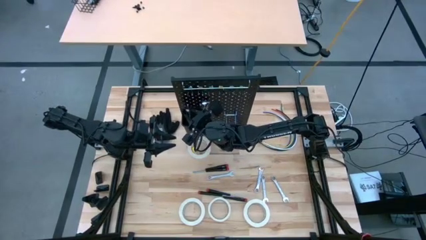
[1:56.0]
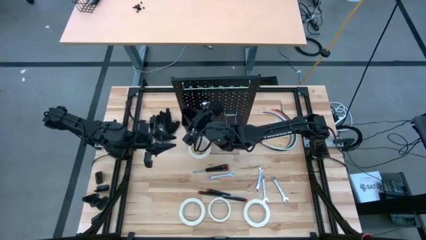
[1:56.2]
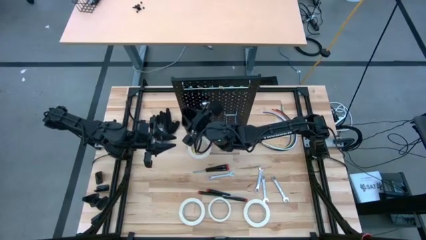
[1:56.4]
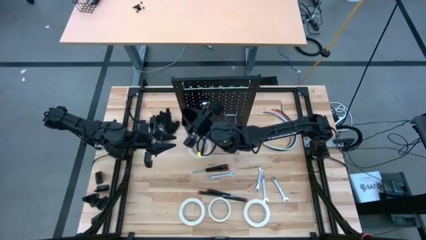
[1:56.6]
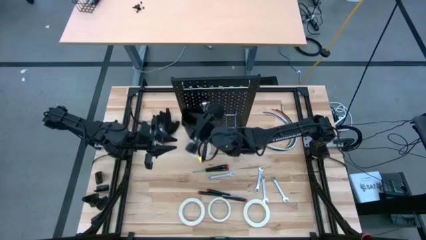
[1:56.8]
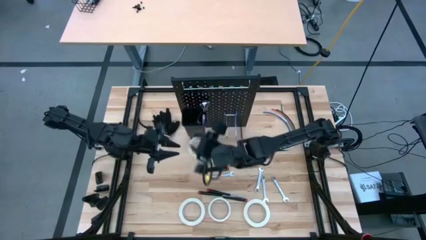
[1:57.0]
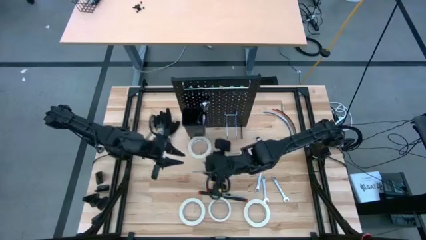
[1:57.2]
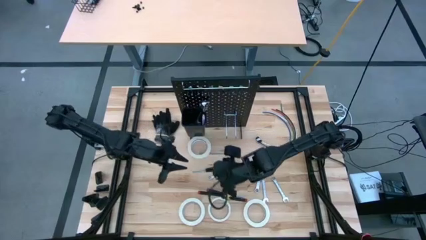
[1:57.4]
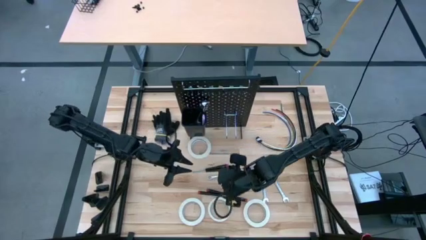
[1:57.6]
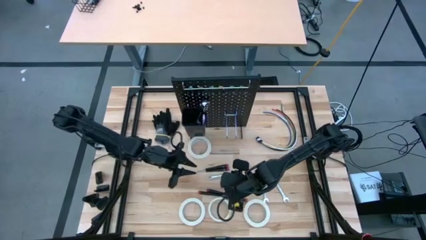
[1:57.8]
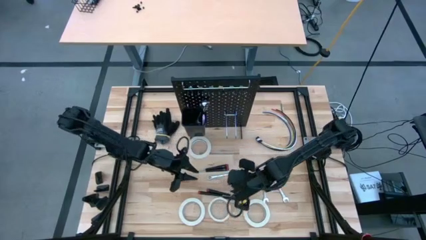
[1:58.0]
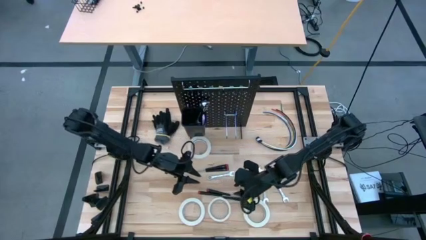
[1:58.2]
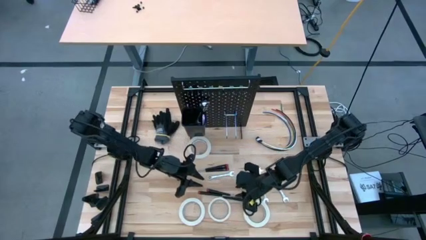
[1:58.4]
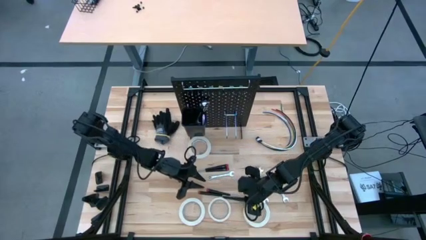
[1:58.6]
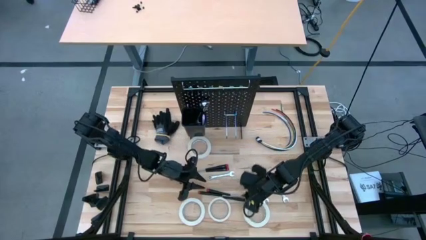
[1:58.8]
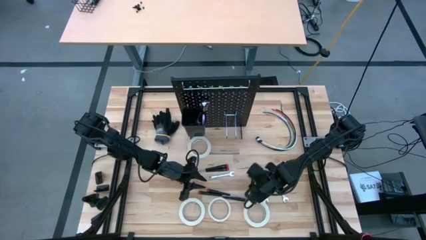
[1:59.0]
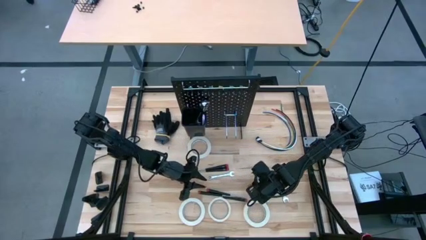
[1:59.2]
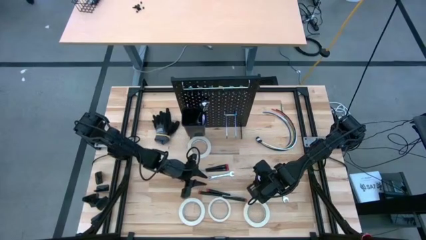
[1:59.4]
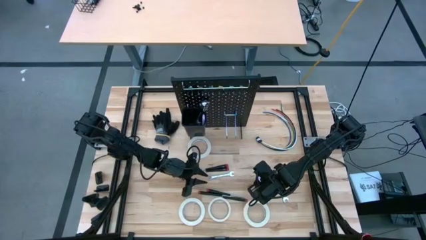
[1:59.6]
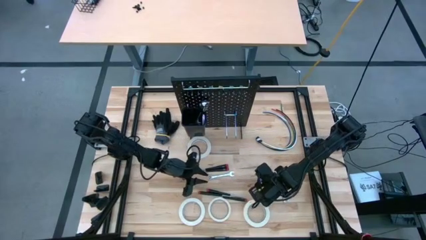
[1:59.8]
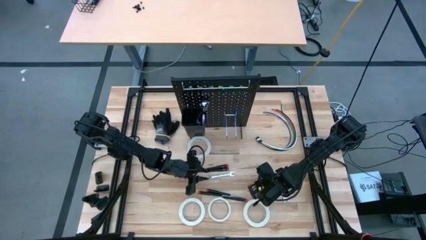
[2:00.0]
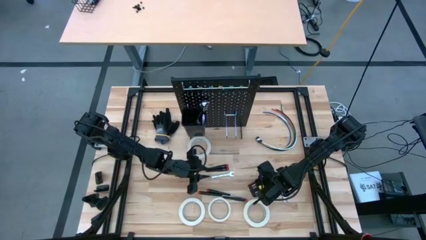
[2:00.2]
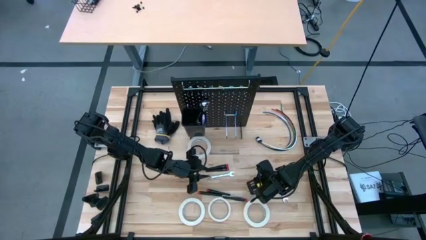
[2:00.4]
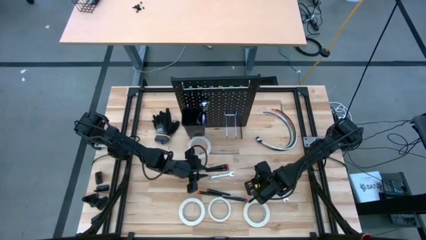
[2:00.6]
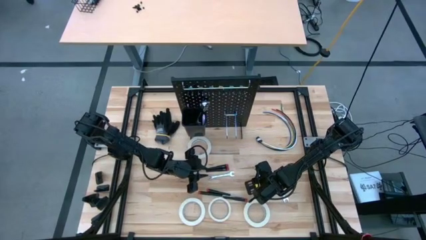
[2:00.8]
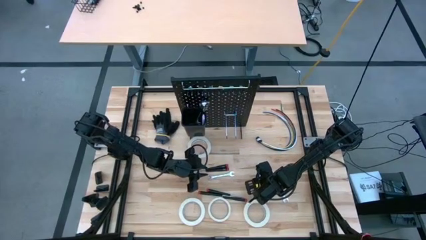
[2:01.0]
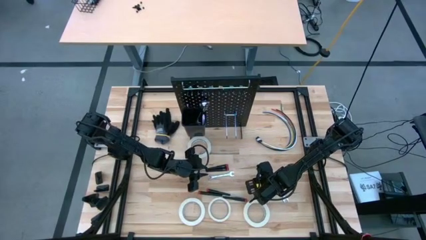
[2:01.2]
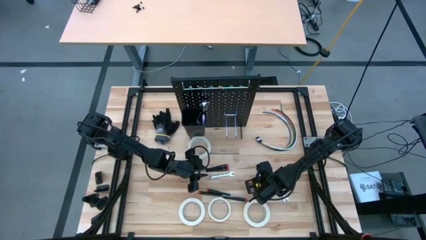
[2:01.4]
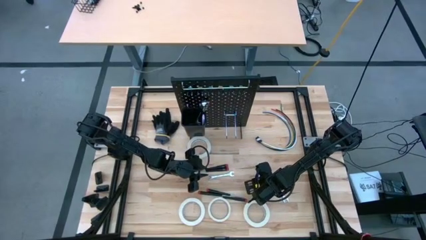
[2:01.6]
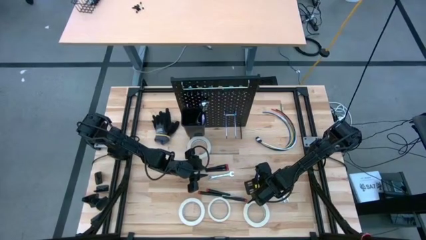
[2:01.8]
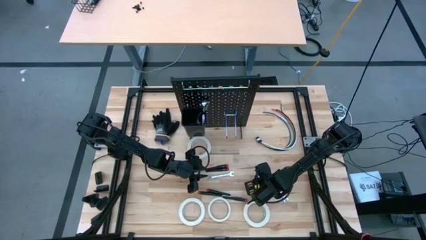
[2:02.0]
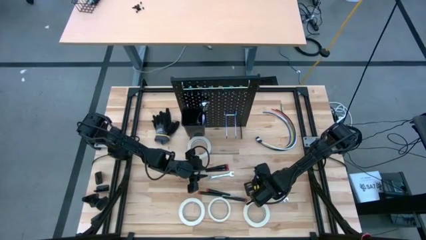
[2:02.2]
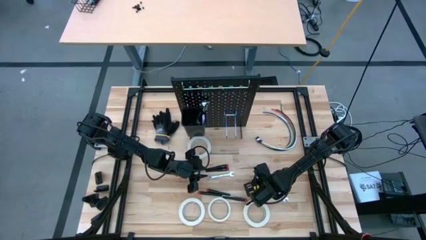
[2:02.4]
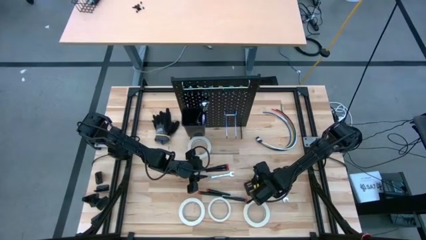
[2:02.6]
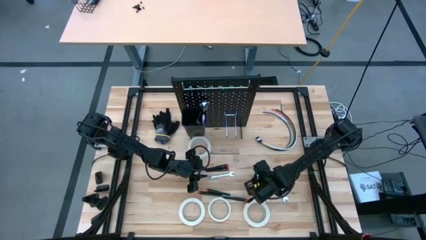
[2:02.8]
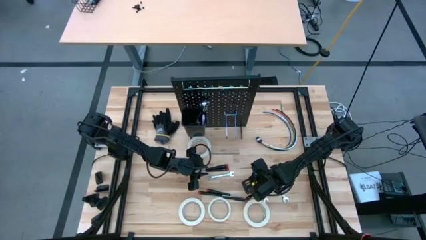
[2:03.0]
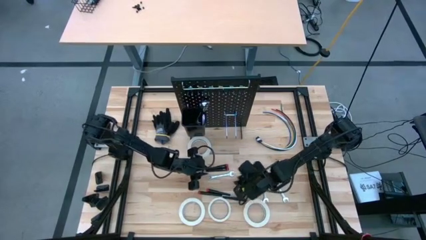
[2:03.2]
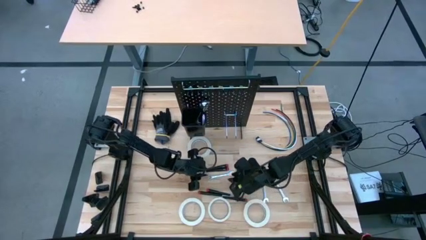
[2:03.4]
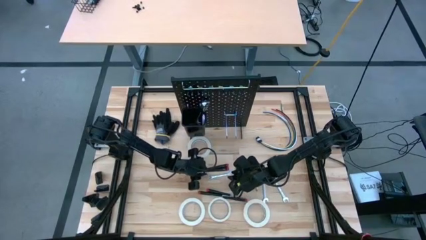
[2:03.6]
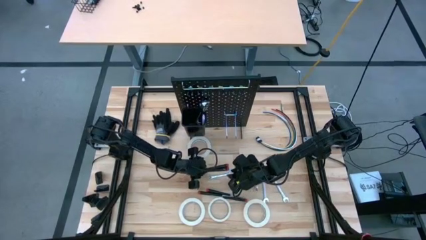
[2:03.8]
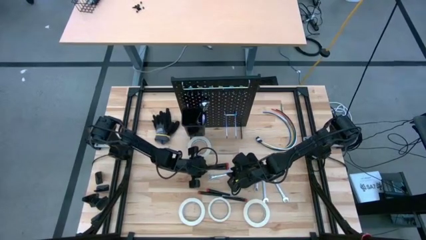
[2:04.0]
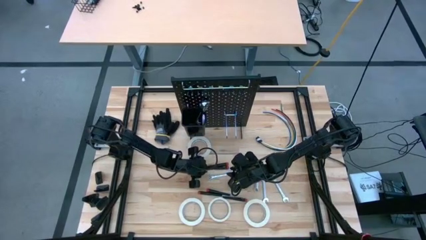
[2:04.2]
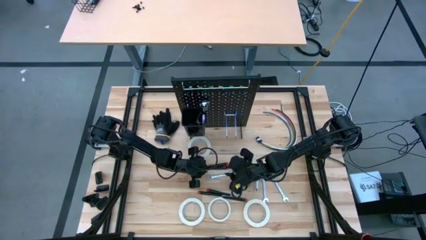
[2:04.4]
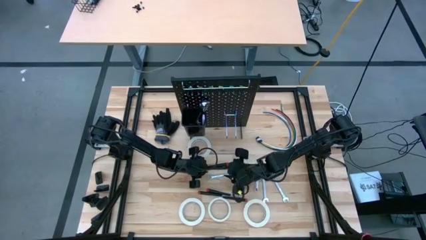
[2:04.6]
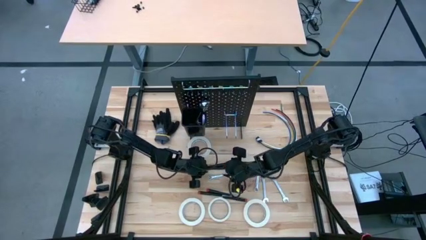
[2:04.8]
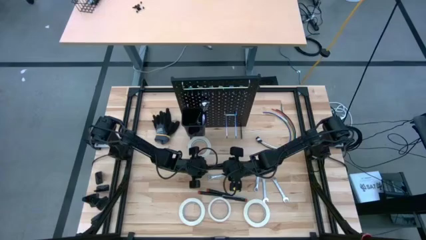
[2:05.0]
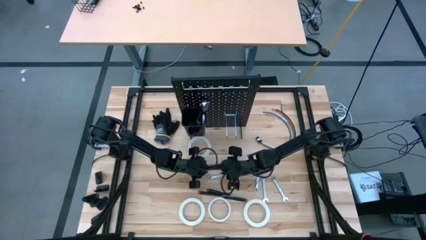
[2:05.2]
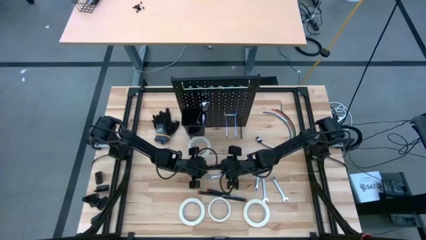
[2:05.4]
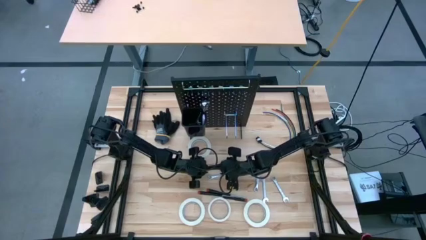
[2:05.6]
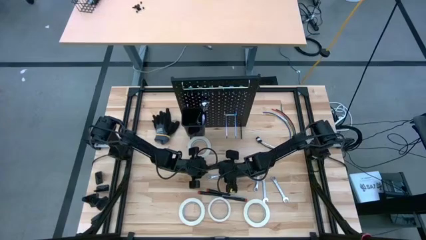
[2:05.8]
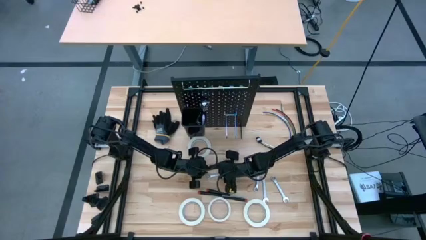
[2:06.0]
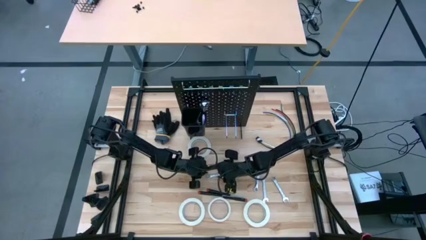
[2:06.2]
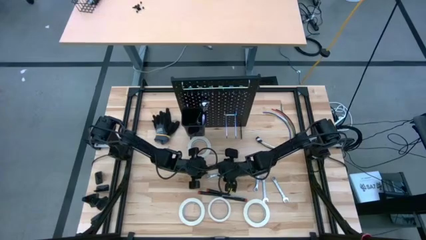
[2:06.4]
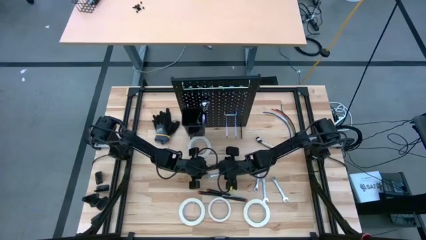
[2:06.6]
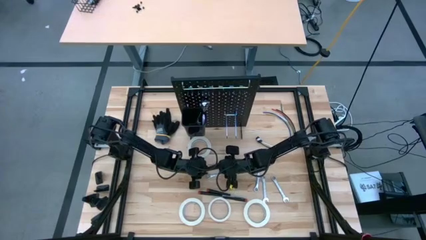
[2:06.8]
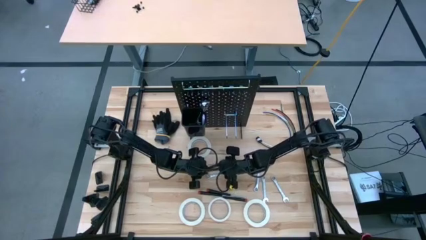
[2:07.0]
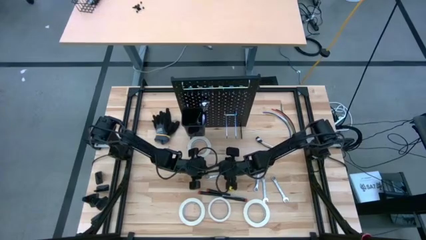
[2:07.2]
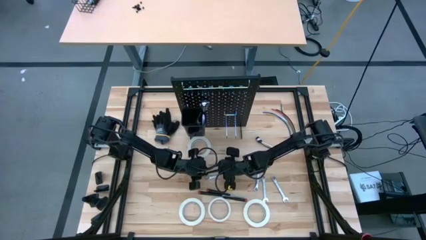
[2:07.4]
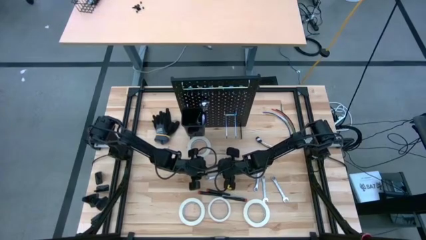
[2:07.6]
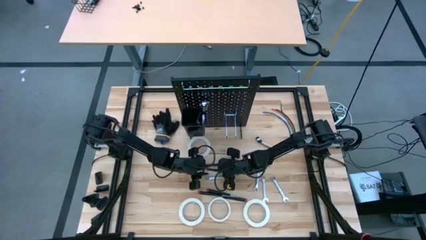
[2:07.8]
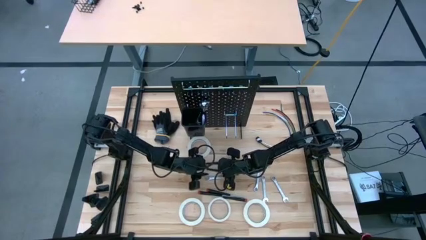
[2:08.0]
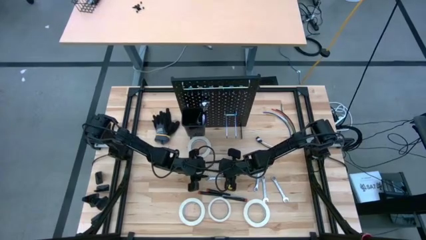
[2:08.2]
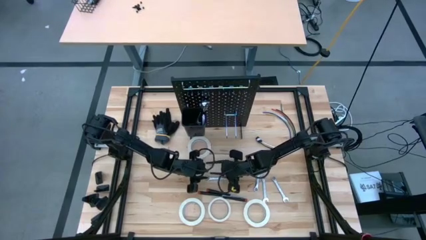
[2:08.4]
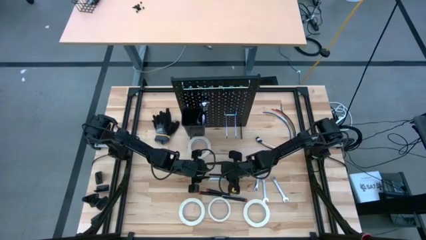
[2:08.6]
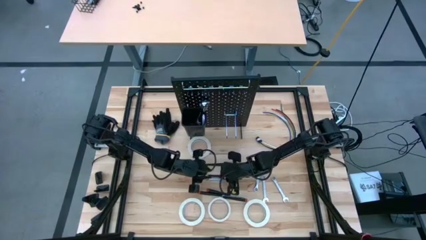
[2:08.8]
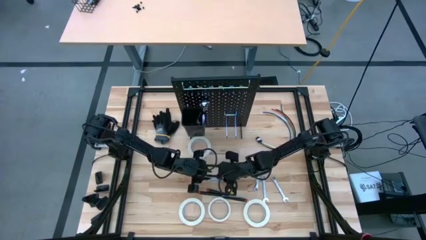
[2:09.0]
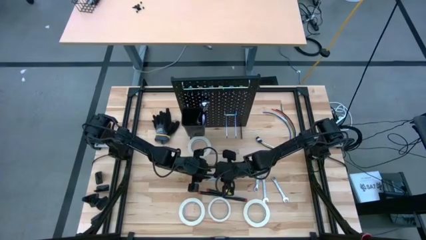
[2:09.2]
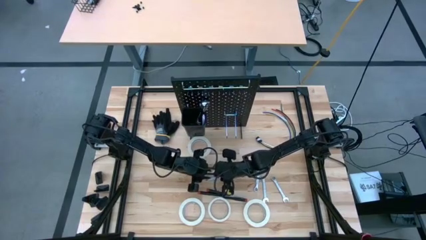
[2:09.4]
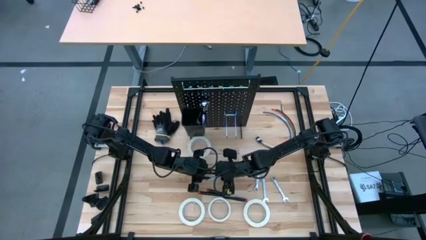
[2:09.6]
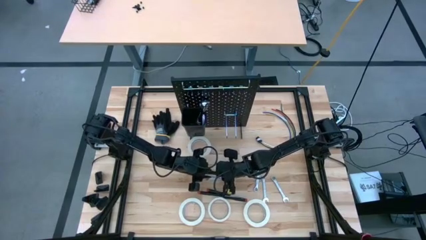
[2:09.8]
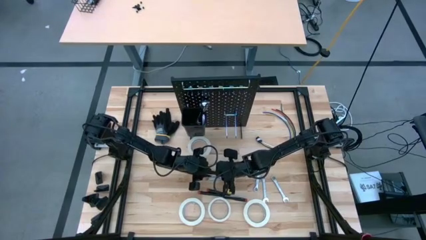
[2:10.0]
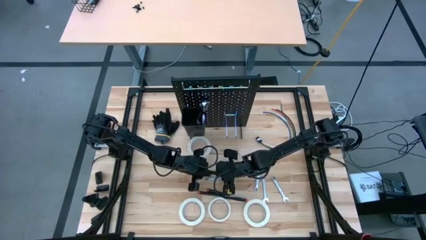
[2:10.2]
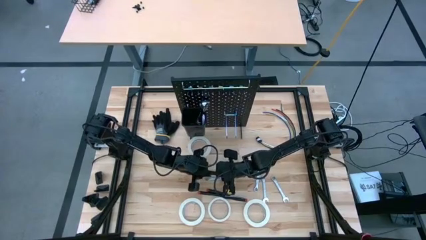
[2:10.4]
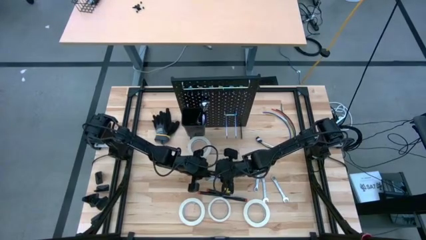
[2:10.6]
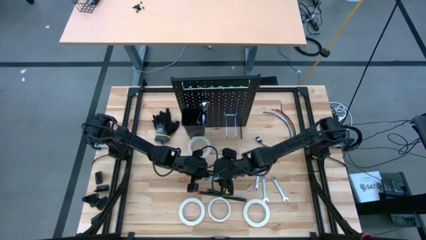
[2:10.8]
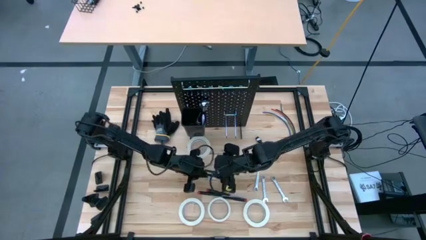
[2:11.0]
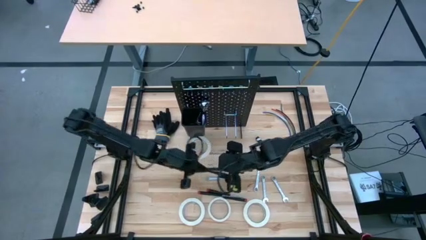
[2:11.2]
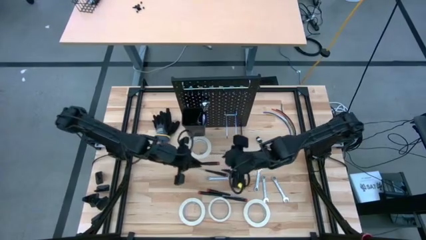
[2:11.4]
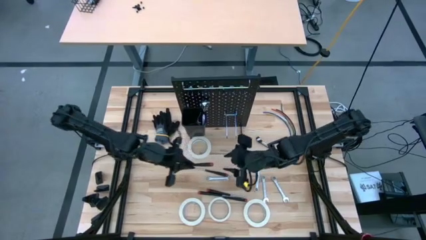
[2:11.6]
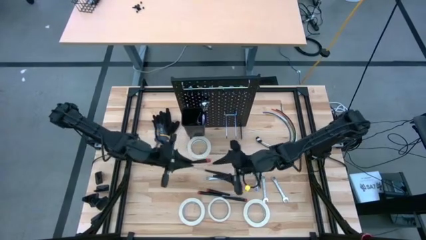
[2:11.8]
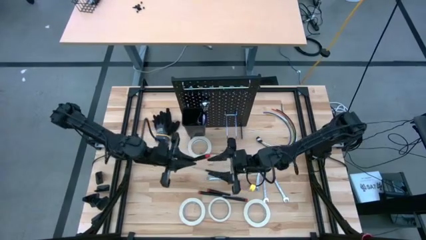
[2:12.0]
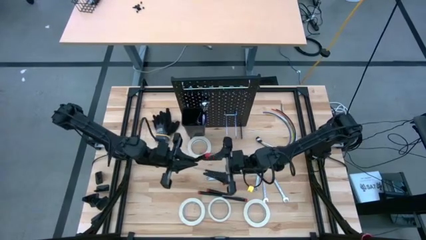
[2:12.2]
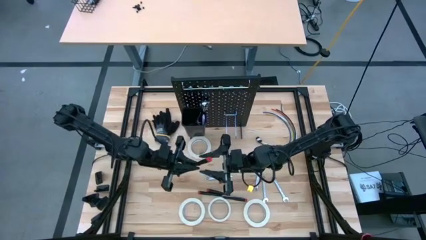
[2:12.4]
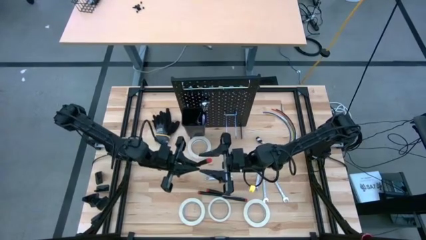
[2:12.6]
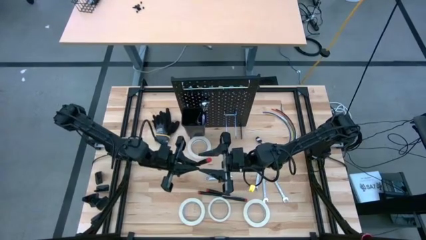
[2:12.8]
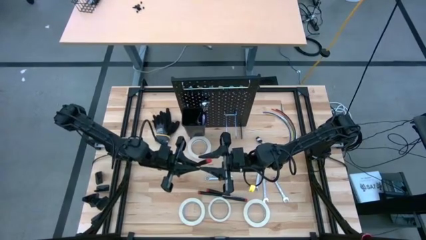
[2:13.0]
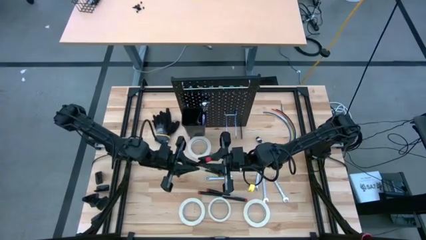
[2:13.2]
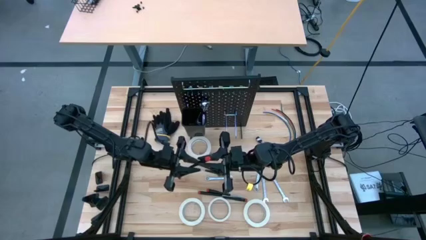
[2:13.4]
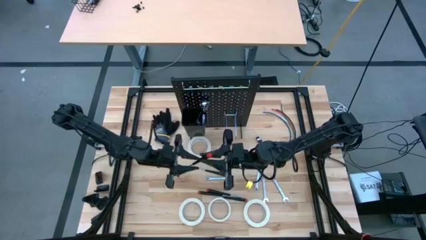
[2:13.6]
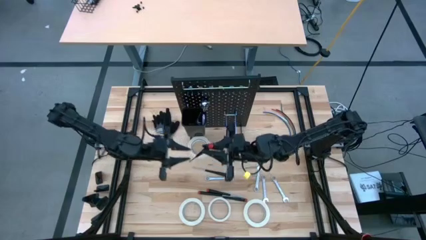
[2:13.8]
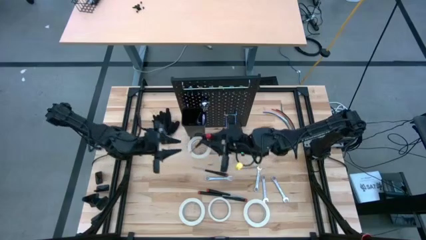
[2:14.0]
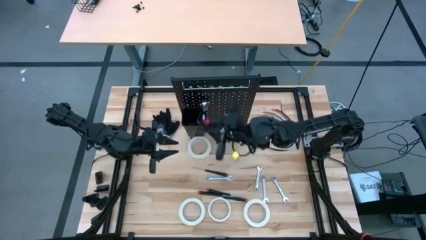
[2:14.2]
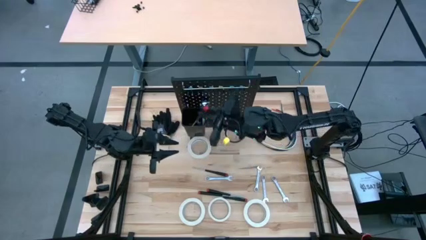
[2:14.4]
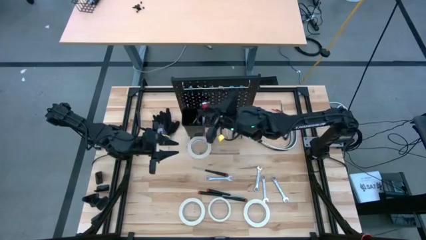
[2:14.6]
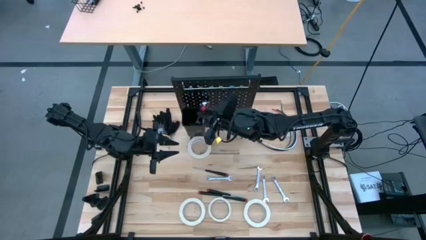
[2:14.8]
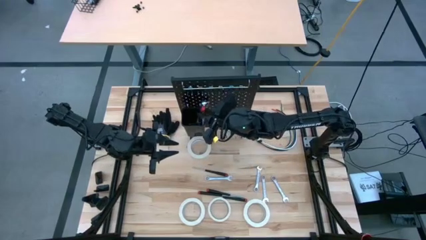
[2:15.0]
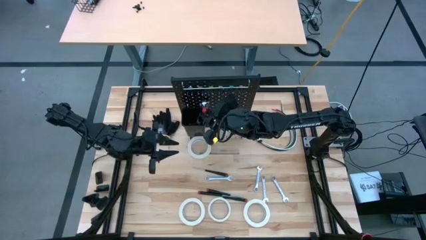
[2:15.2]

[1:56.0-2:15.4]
Task: Hang tools onto peg board
Put the black nut driver into the black bin on the peg board
